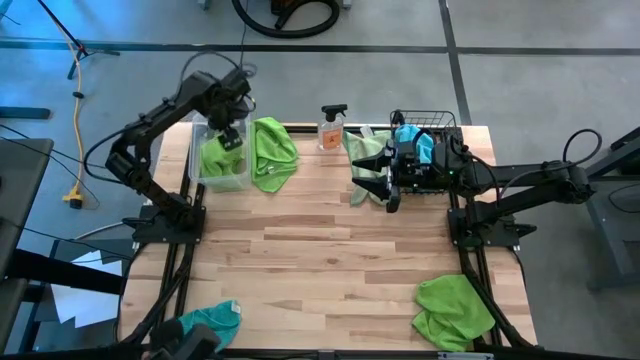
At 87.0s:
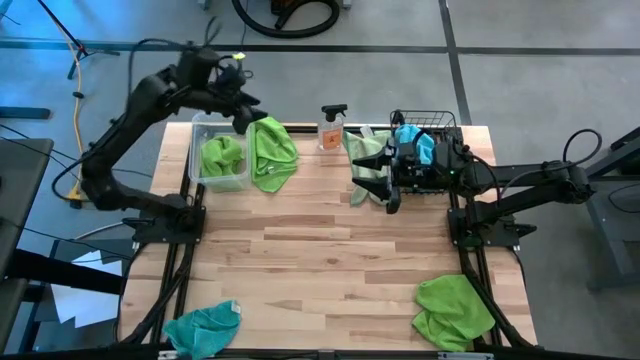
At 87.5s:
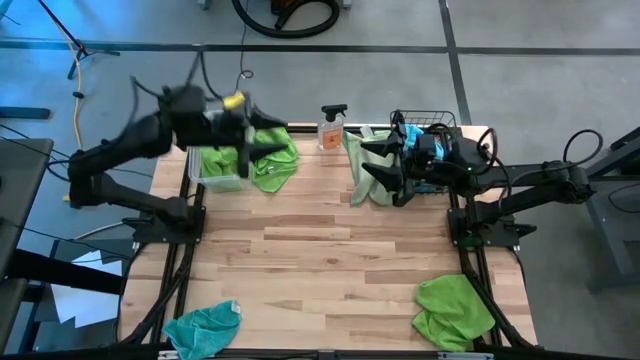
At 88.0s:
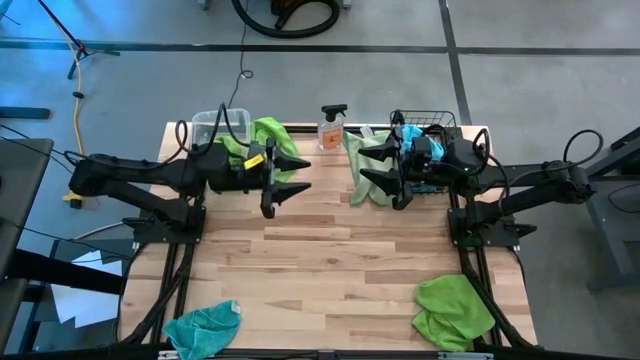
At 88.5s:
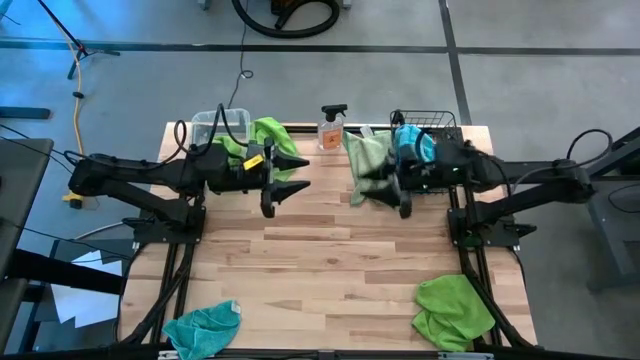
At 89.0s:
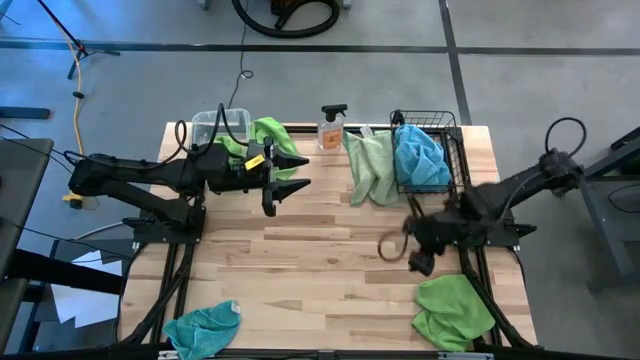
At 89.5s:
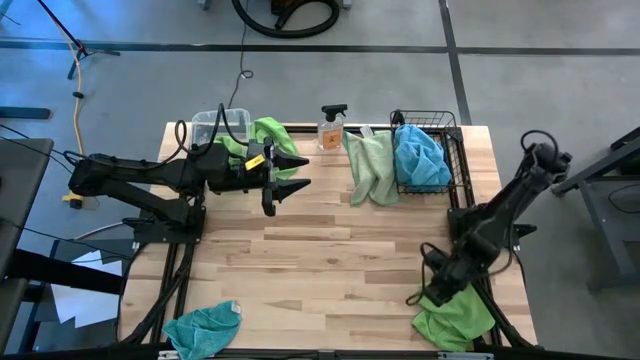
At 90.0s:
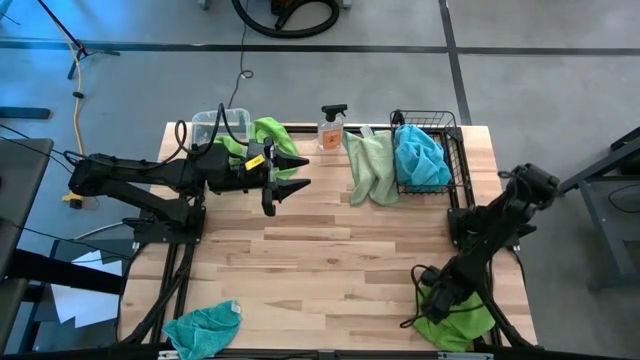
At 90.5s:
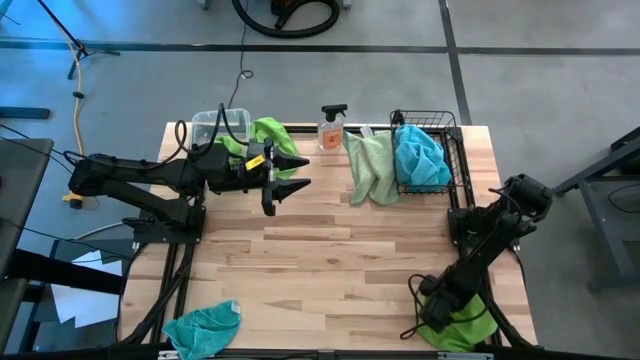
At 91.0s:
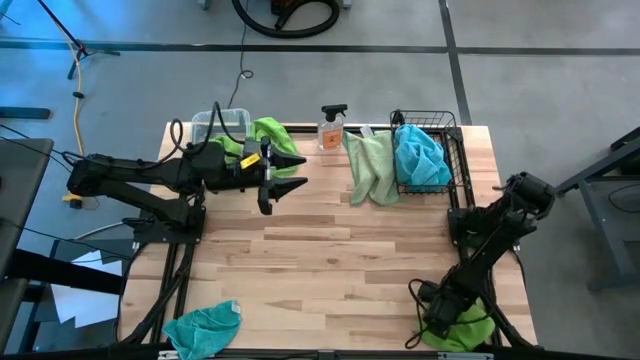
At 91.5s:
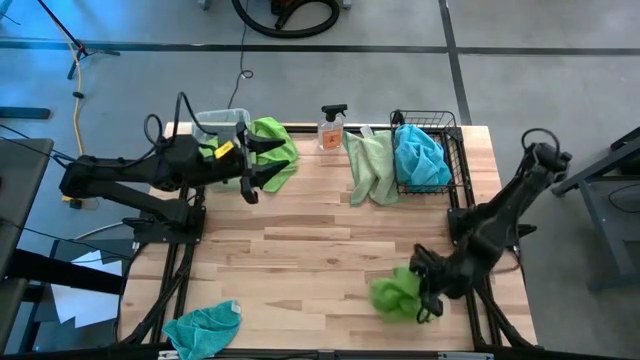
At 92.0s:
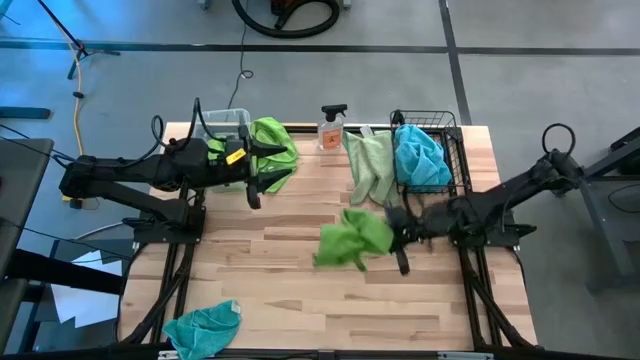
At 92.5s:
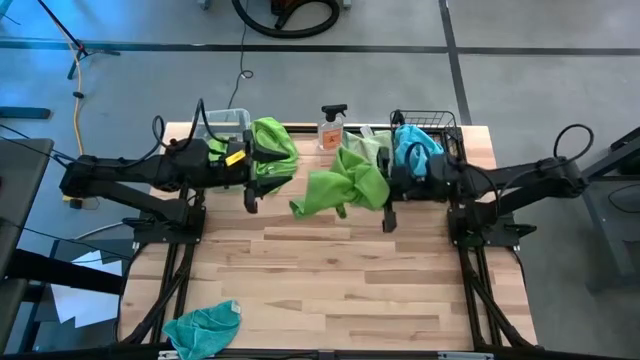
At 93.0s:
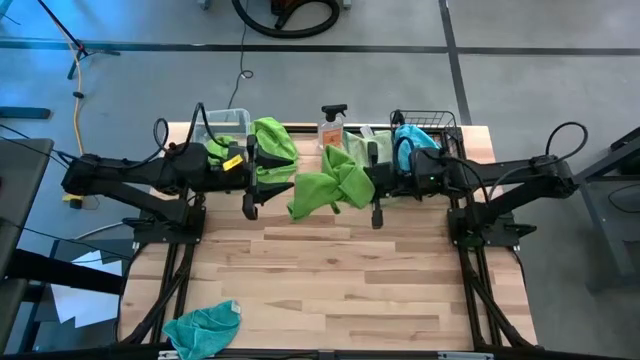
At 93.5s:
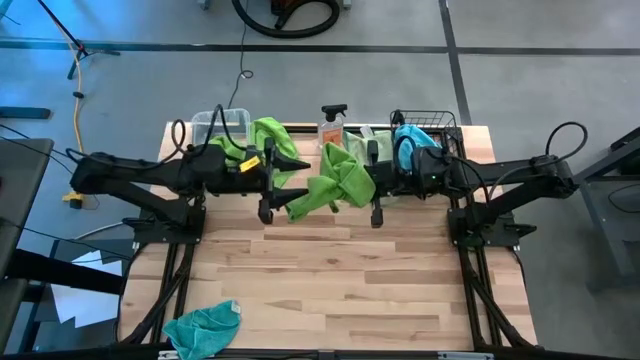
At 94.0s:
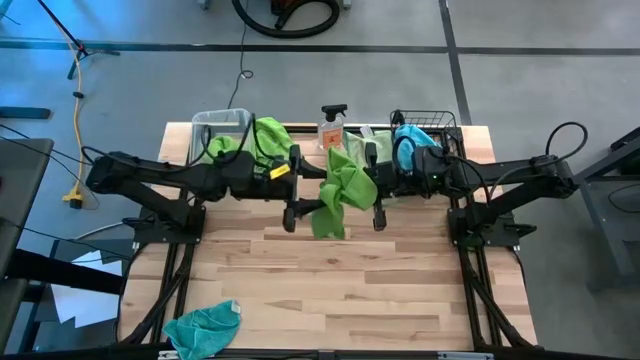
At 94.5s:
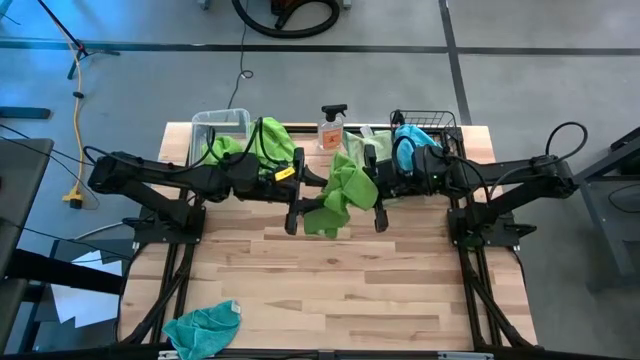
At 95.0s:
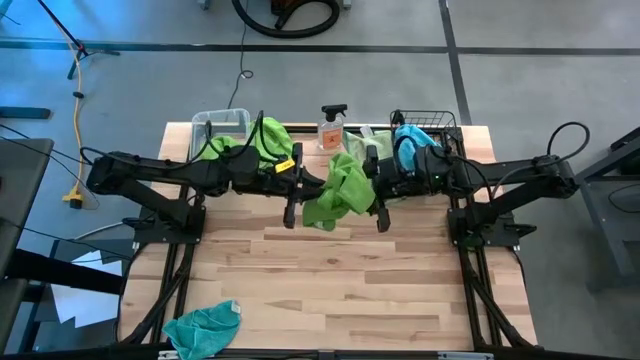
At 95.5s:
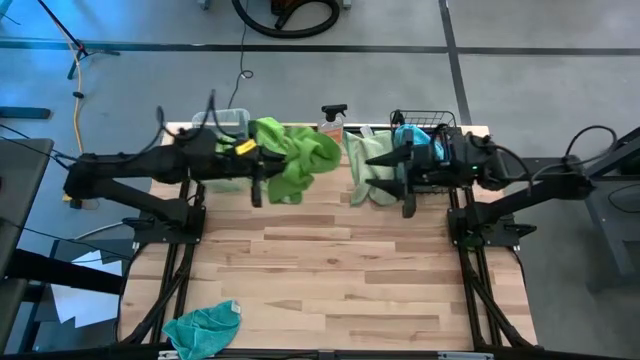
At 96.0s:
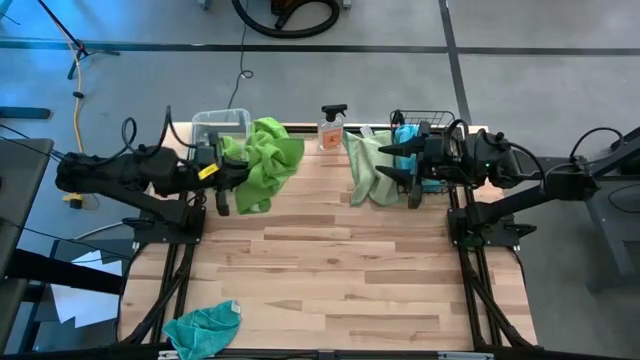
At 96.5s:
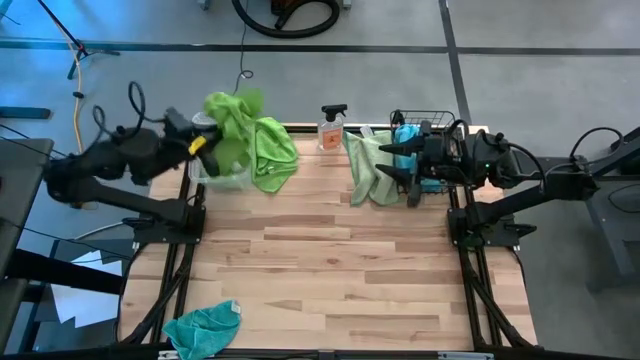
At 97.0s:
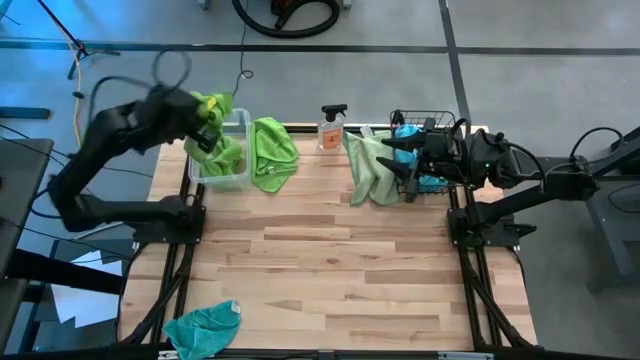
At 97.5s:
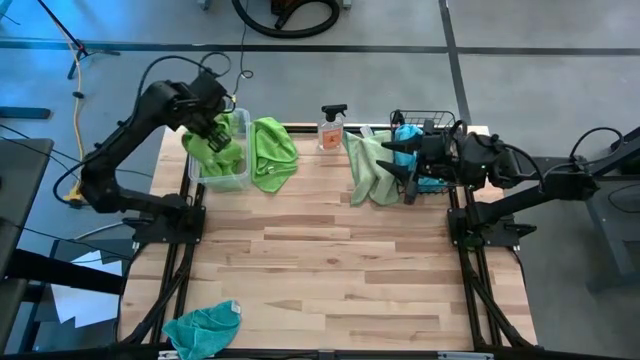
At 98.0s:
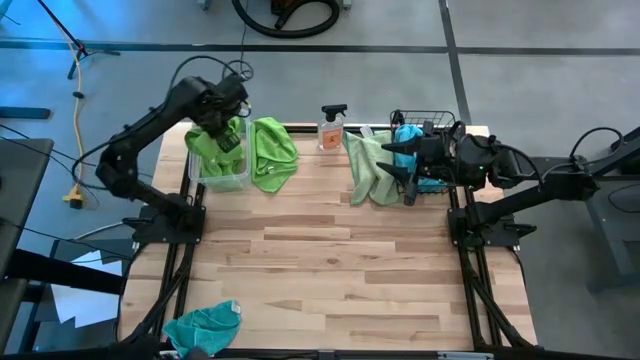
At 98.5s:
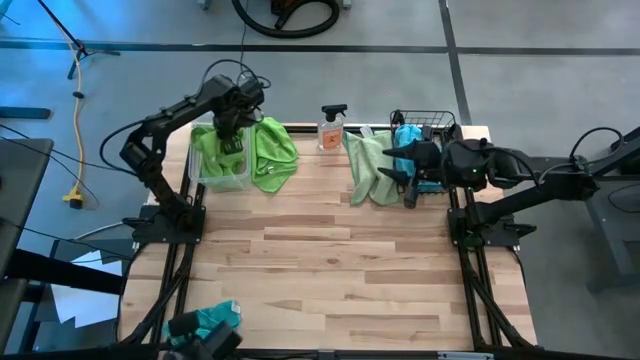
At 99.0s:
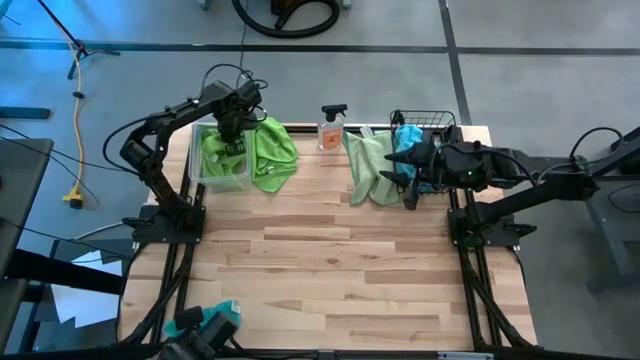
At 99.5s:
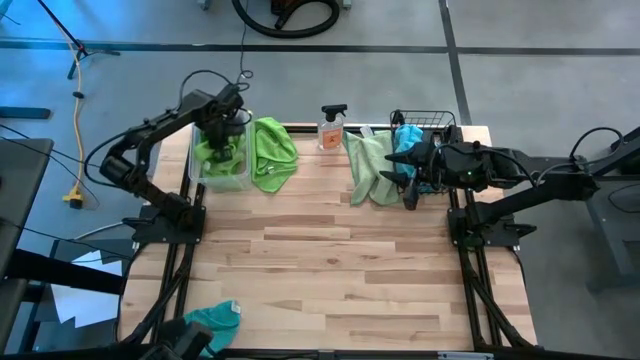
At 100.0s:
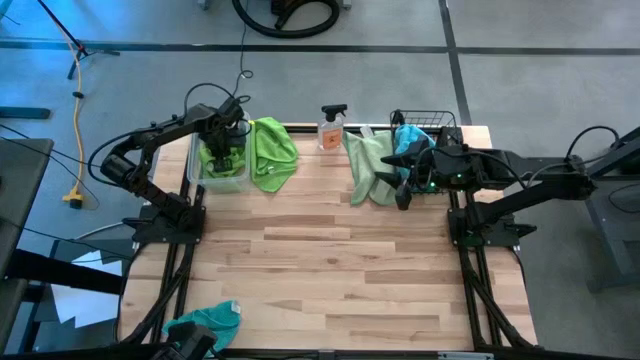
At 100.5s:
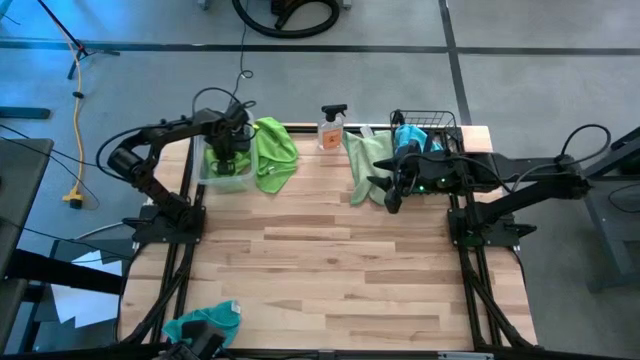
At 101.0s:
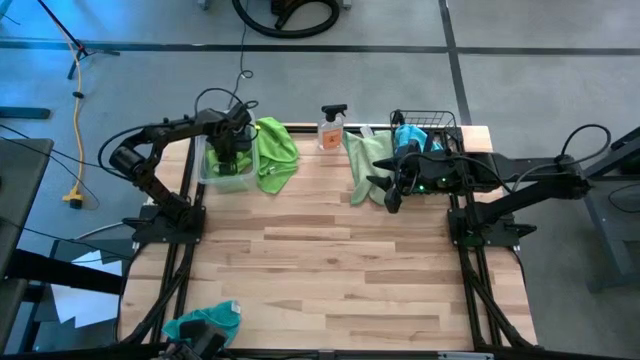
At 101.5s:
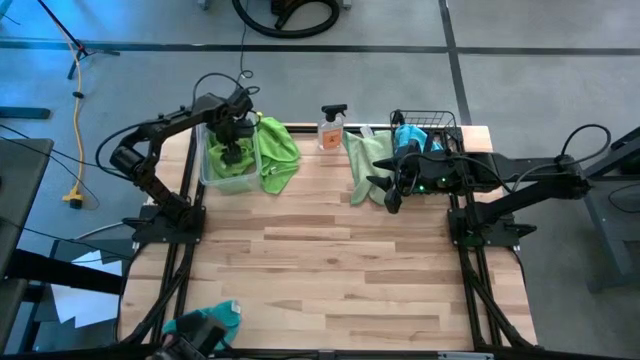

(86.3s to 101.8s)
Task: Sort microfiber towel by color & place in baskets
Put the green microfiber cloth into the bin

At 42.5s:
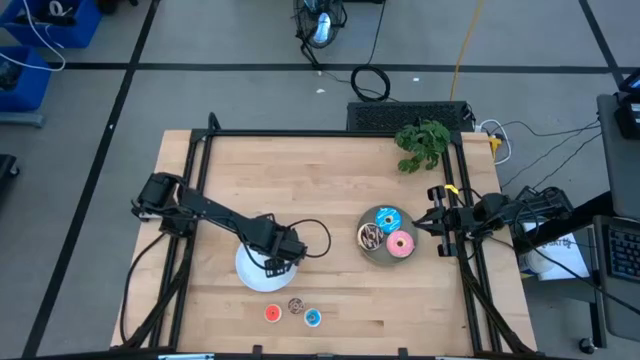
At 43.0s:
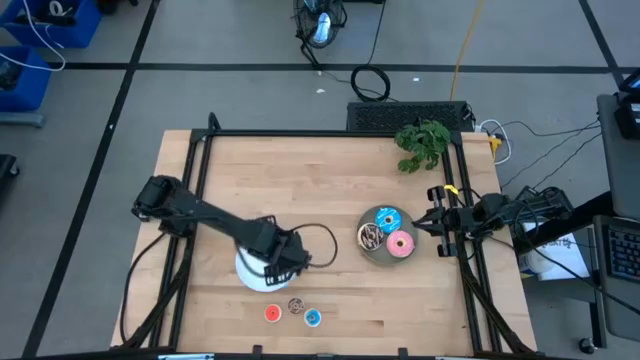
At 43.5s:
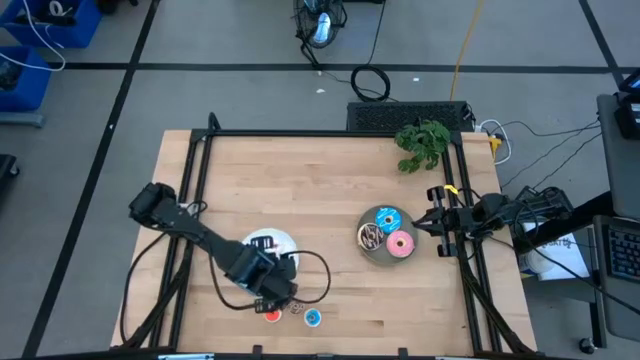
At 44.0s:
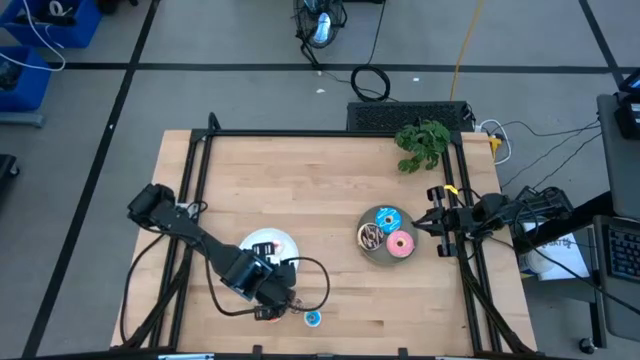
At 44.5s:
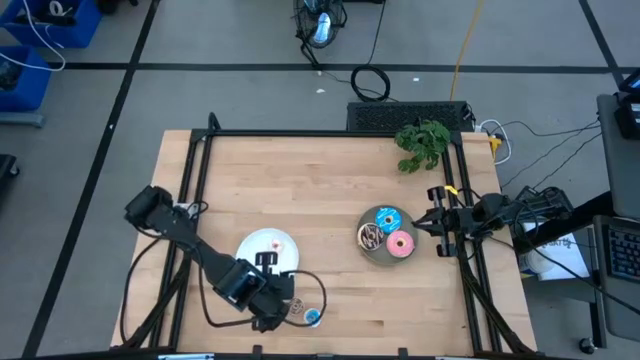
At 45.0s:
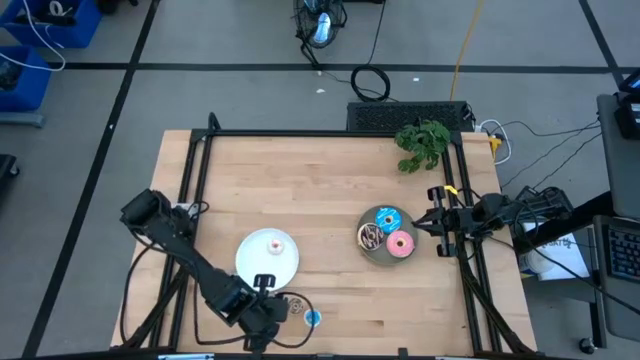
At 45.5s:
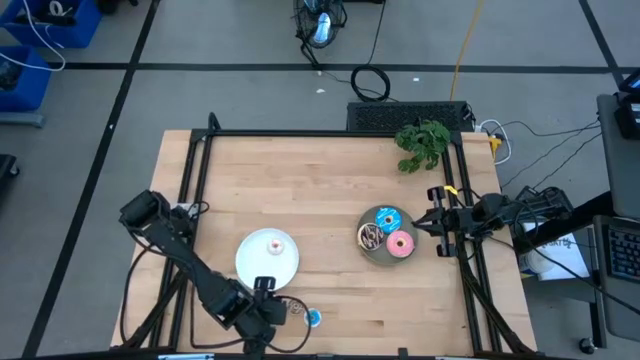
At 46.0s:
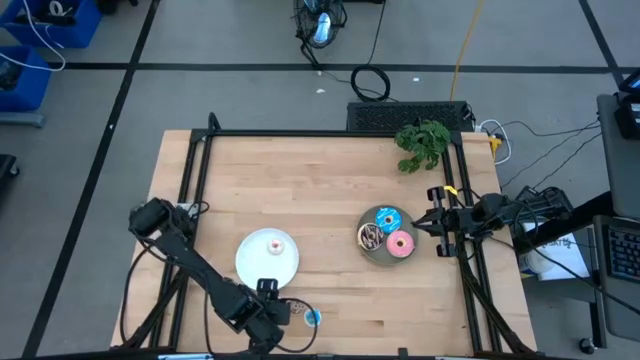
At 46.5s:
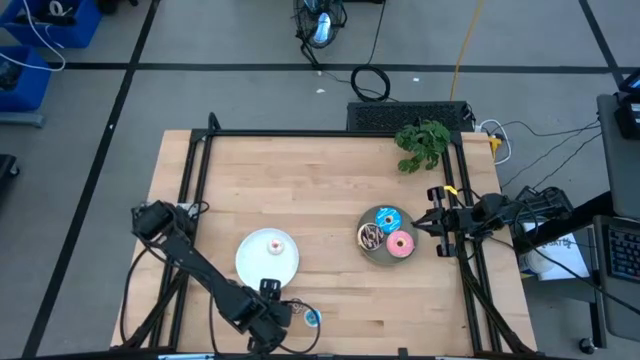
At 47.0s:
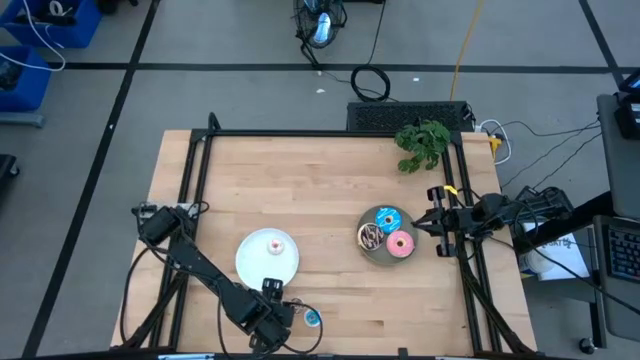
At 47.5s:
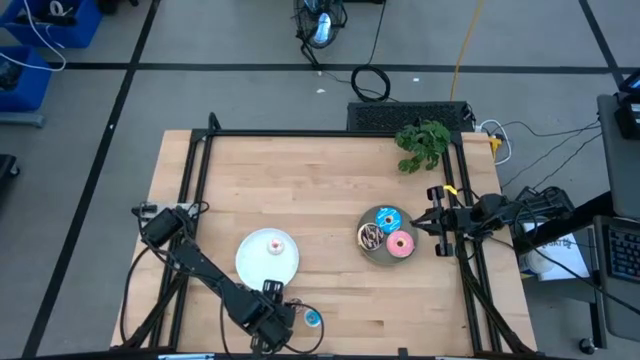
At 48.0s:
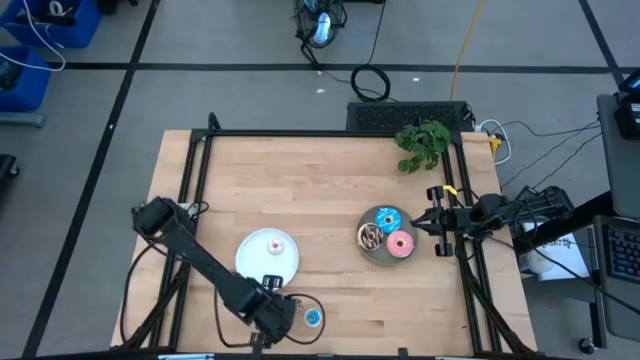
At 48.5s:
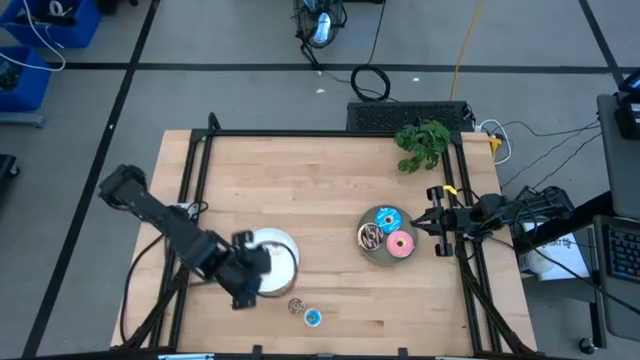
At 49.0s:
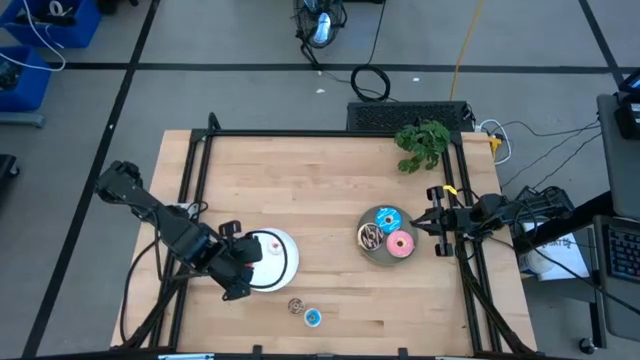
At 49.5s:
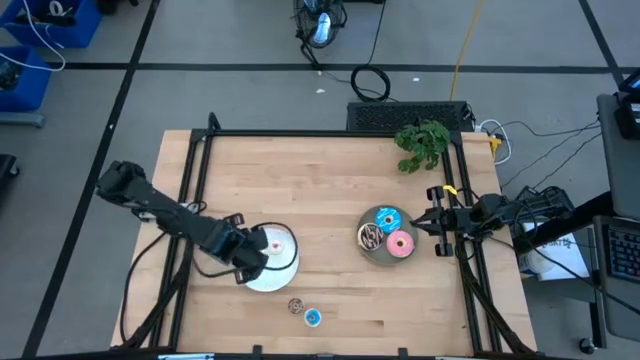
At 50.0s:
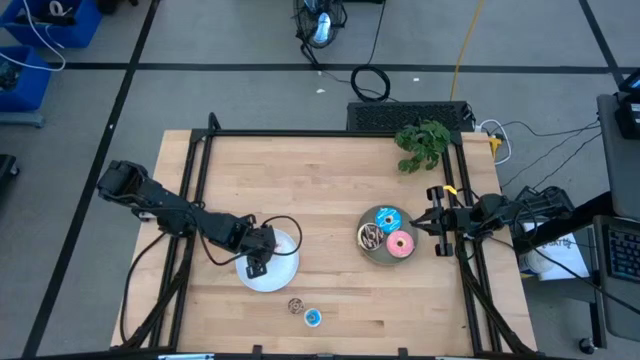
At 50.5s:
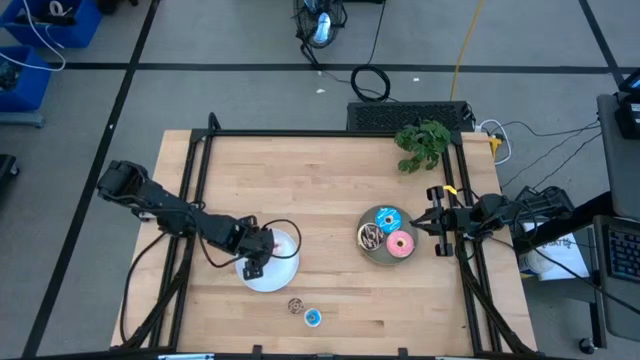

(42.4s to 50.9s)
Task: Pick & Place donuts
Put the small orange donut on the white plate
